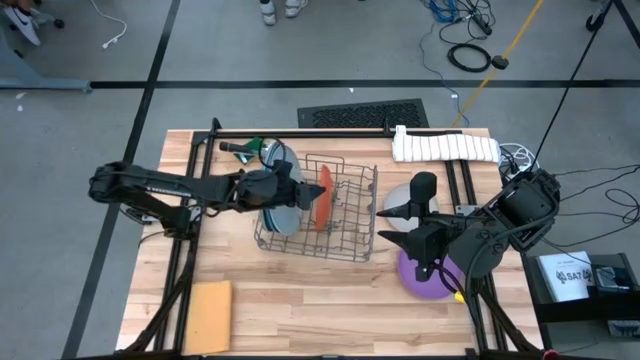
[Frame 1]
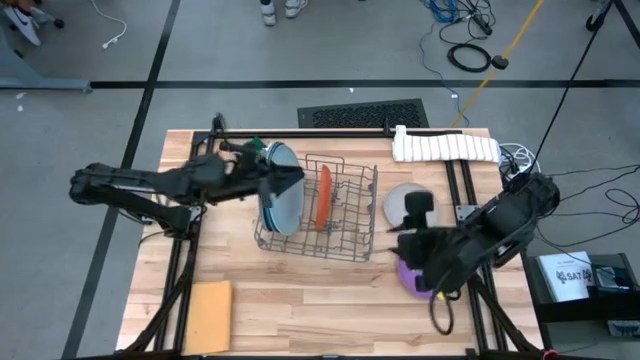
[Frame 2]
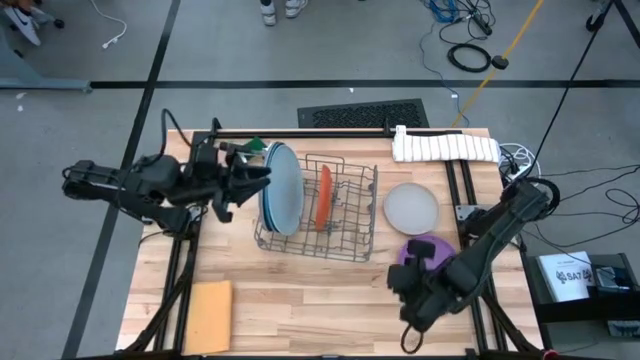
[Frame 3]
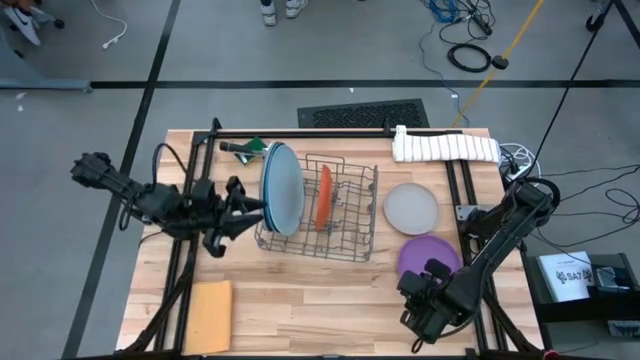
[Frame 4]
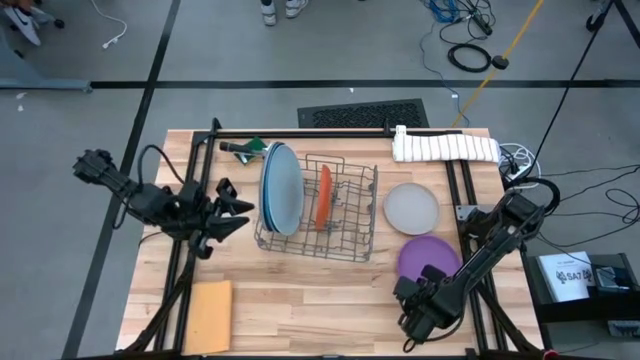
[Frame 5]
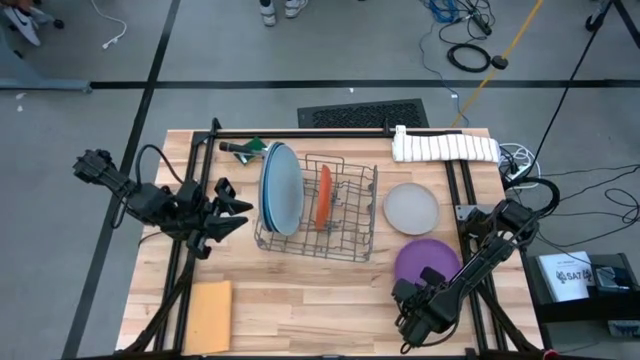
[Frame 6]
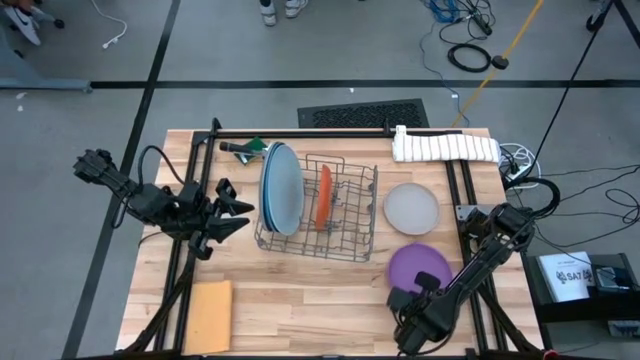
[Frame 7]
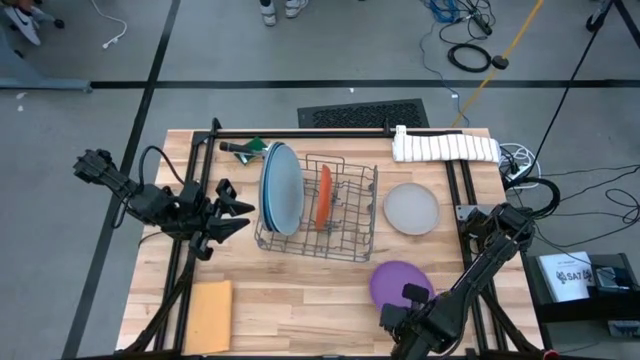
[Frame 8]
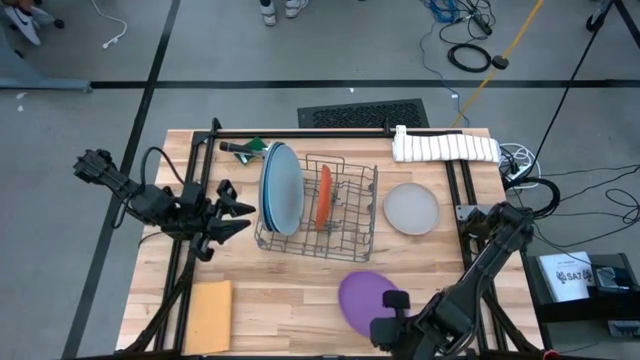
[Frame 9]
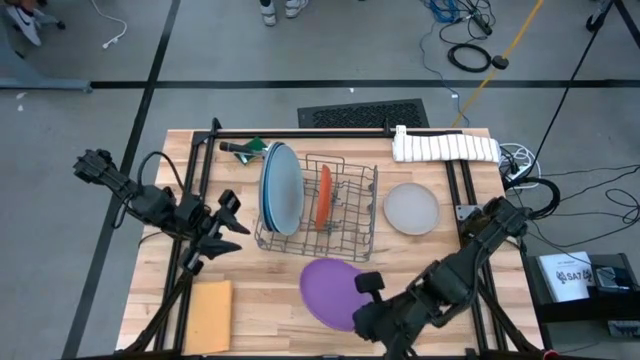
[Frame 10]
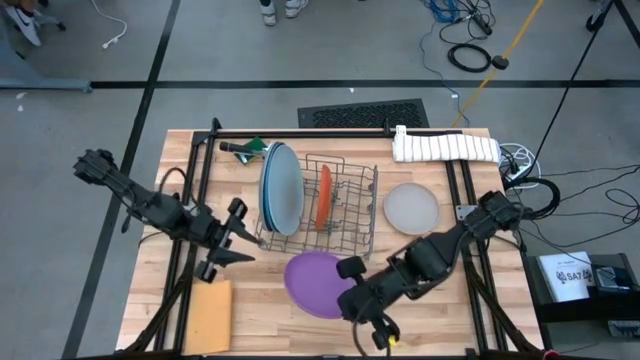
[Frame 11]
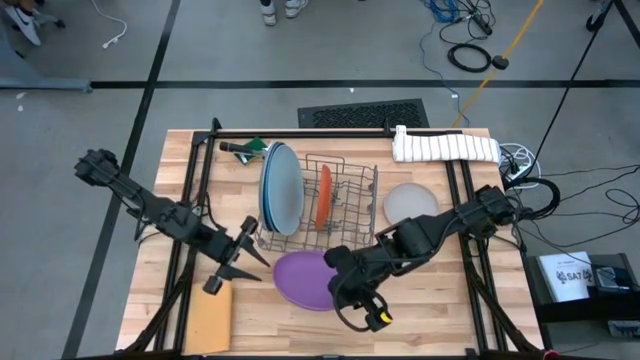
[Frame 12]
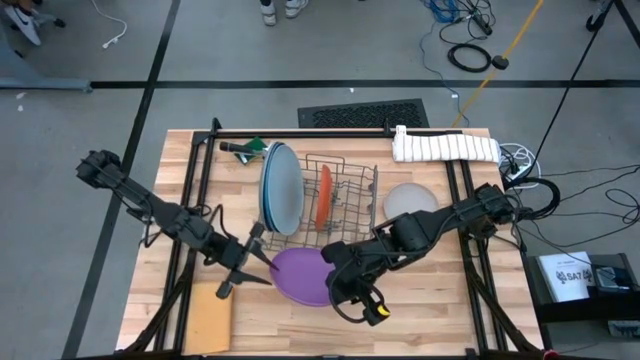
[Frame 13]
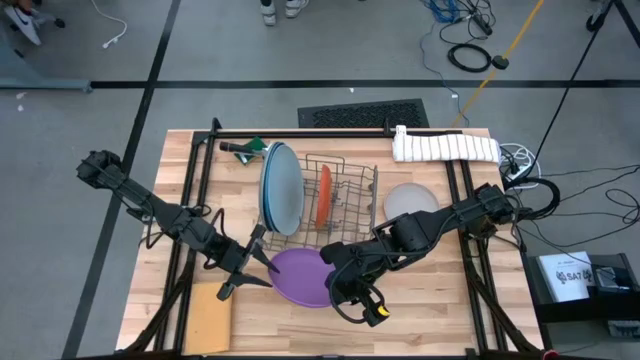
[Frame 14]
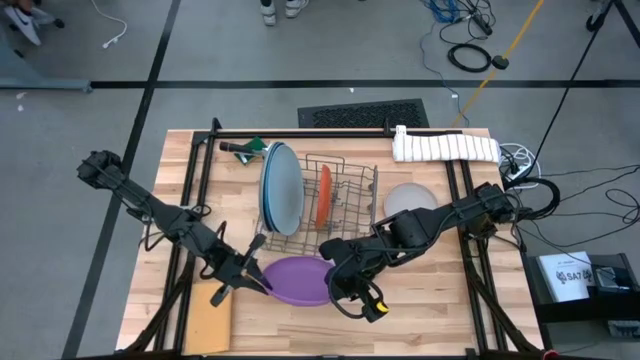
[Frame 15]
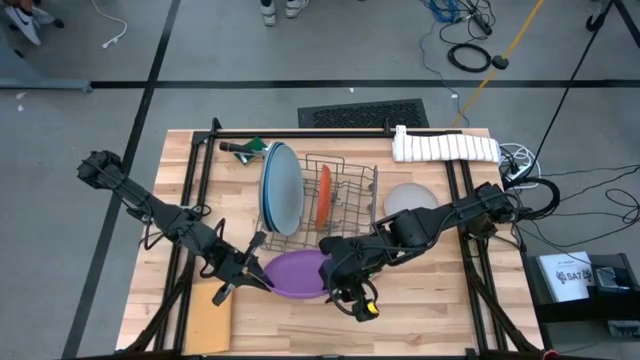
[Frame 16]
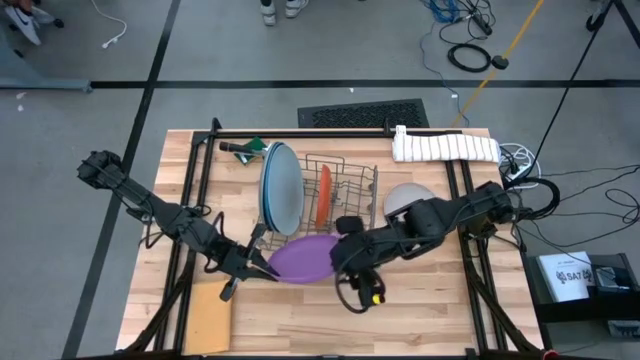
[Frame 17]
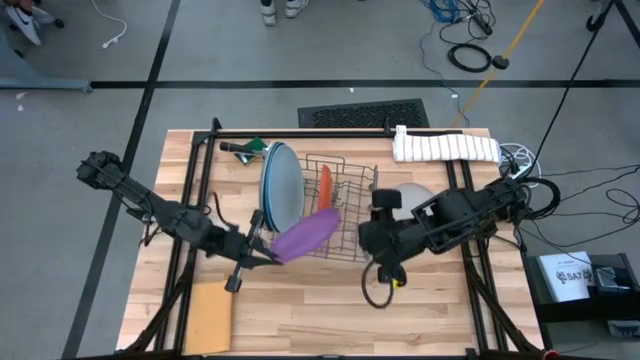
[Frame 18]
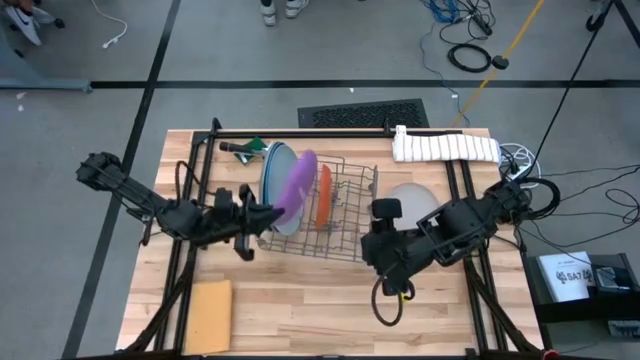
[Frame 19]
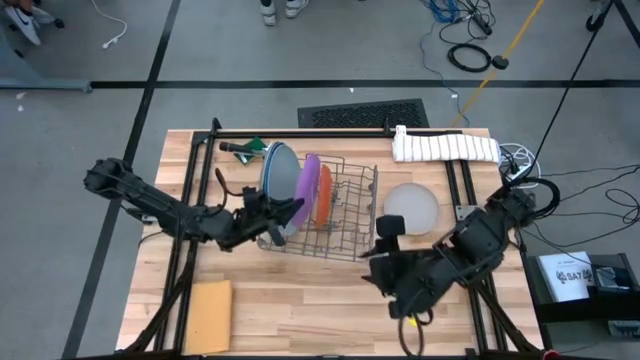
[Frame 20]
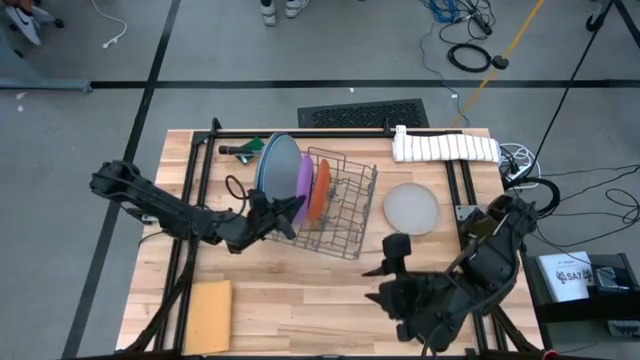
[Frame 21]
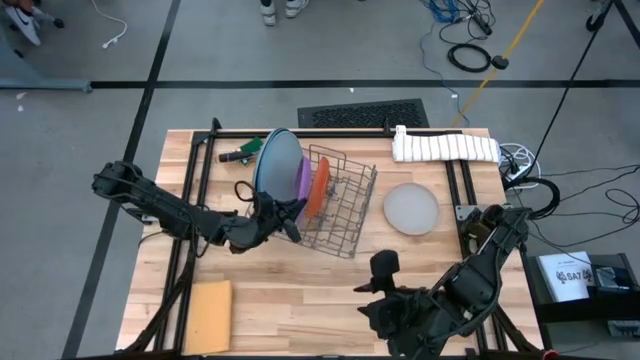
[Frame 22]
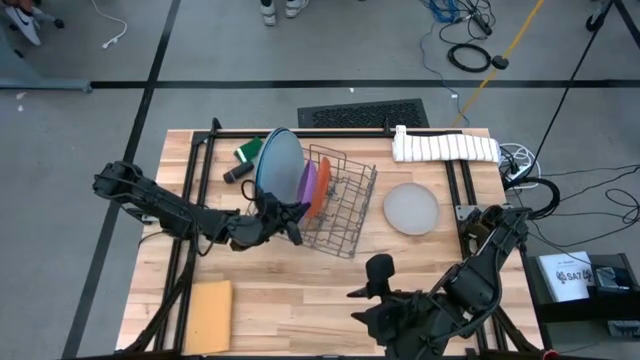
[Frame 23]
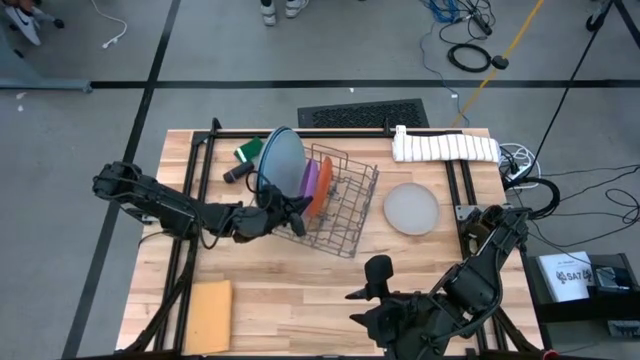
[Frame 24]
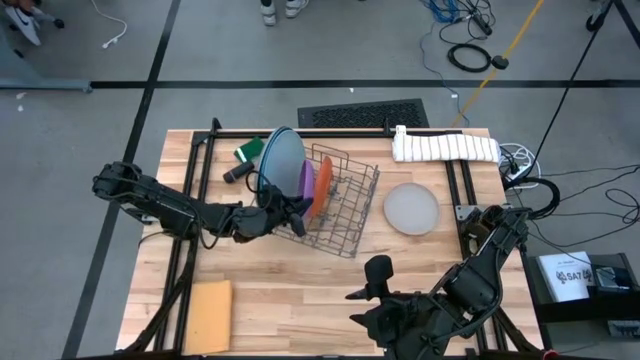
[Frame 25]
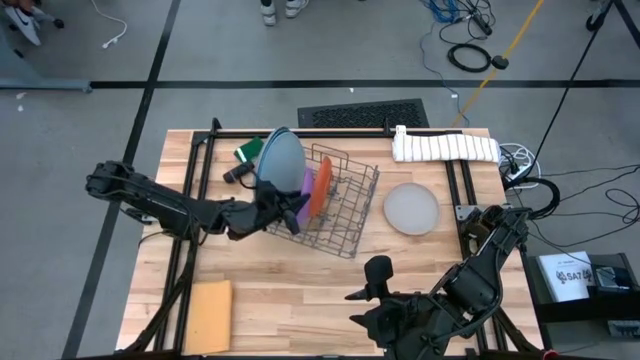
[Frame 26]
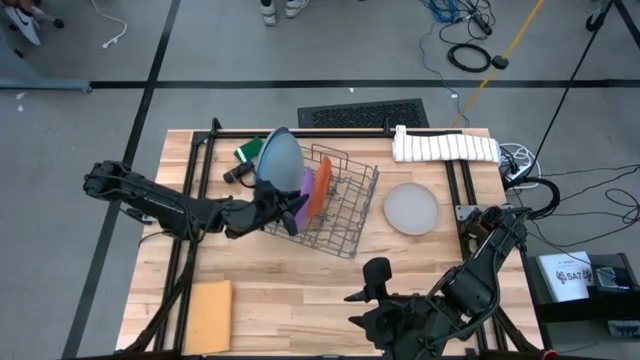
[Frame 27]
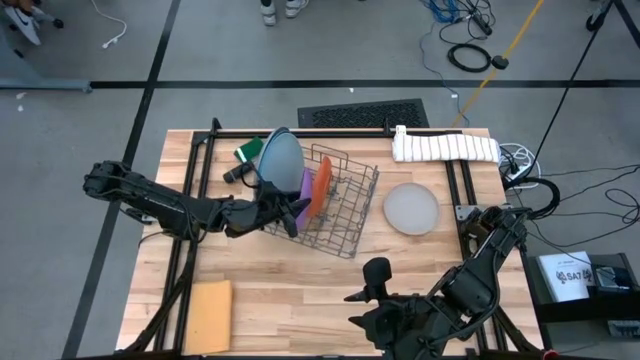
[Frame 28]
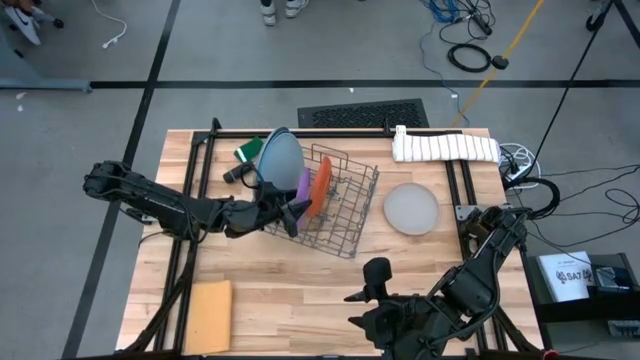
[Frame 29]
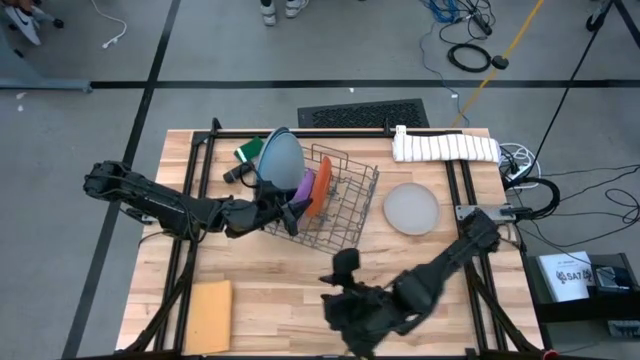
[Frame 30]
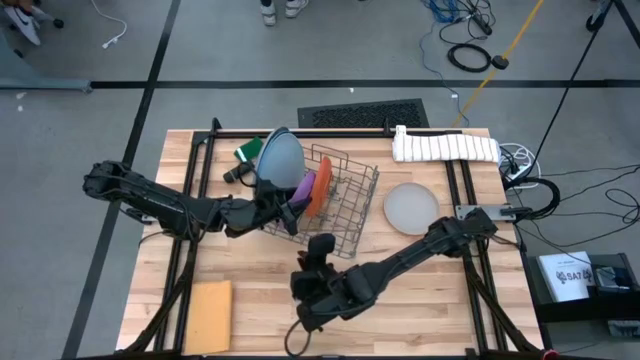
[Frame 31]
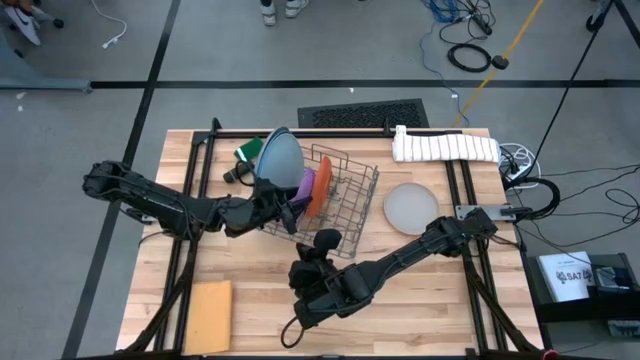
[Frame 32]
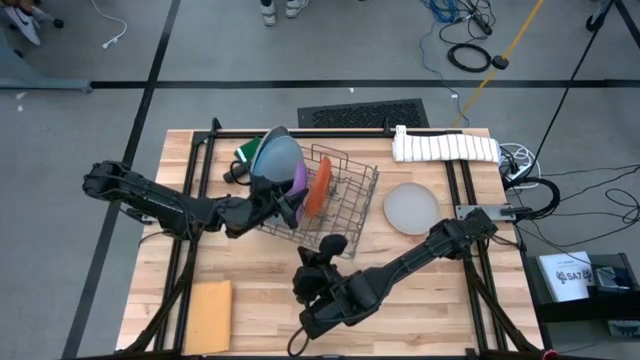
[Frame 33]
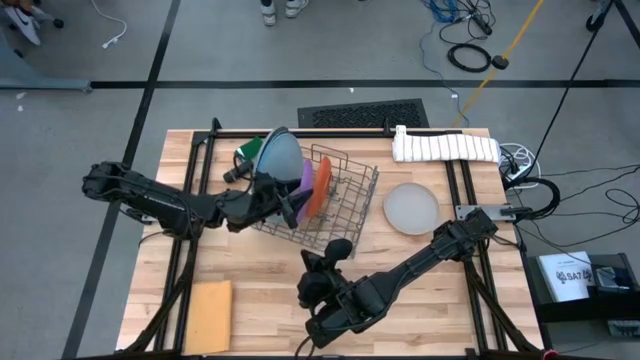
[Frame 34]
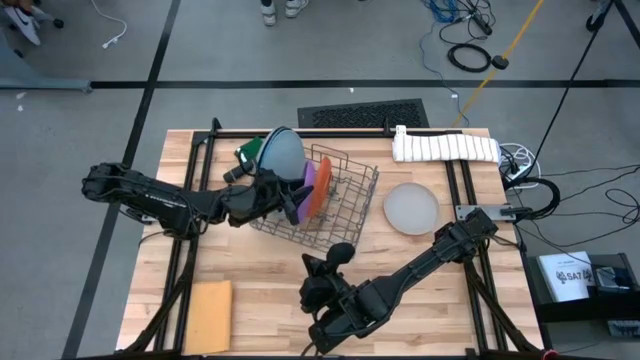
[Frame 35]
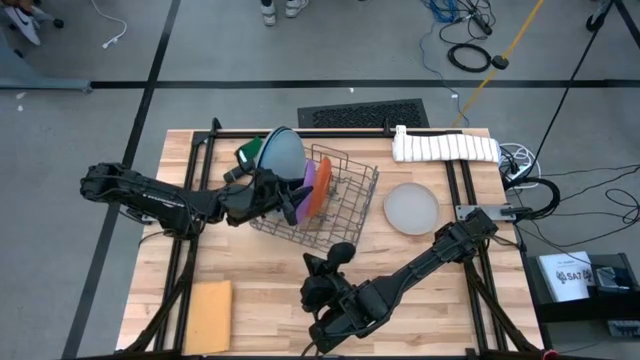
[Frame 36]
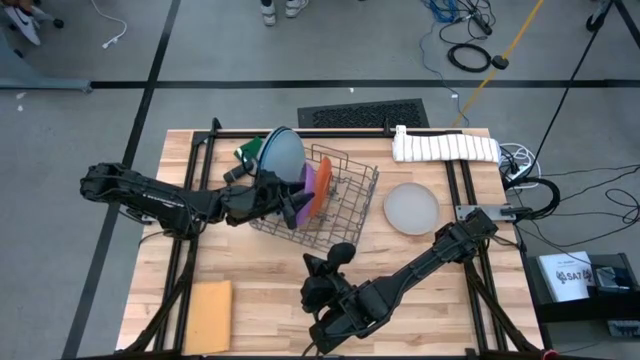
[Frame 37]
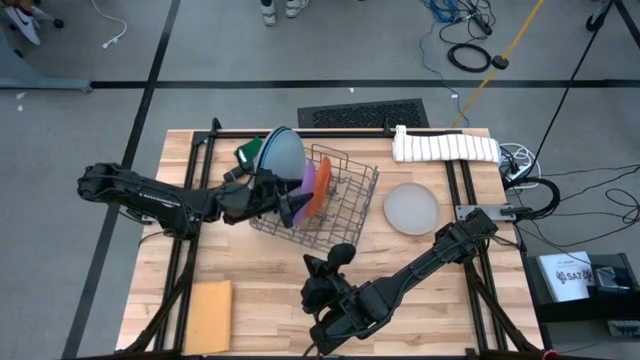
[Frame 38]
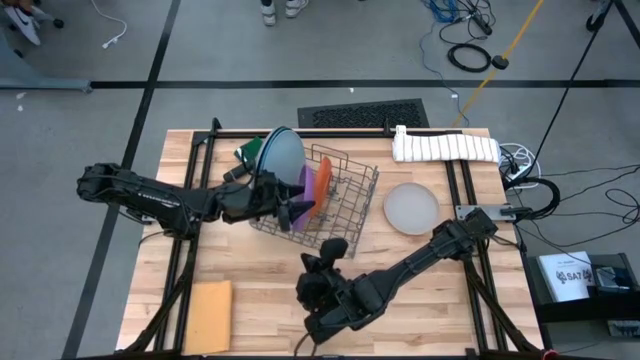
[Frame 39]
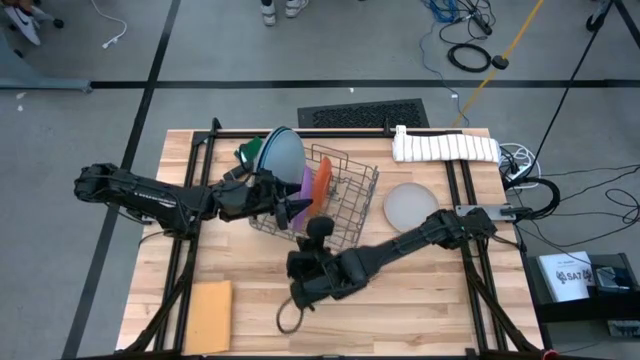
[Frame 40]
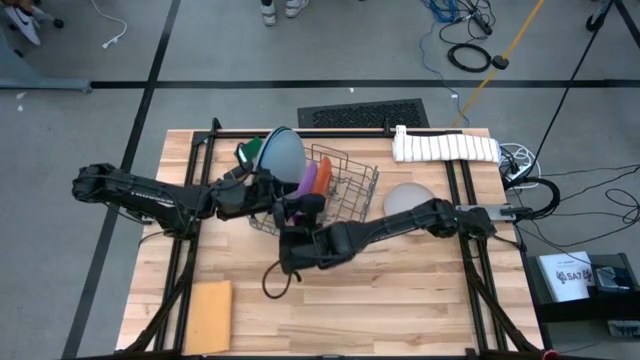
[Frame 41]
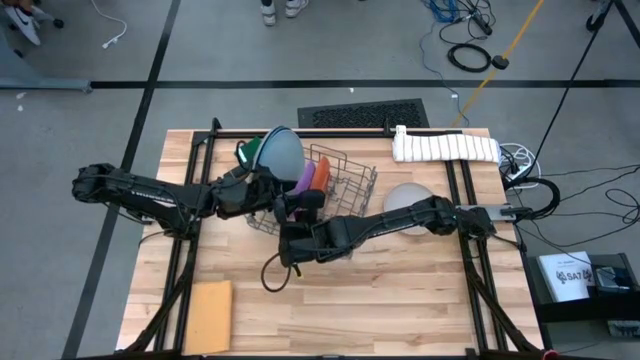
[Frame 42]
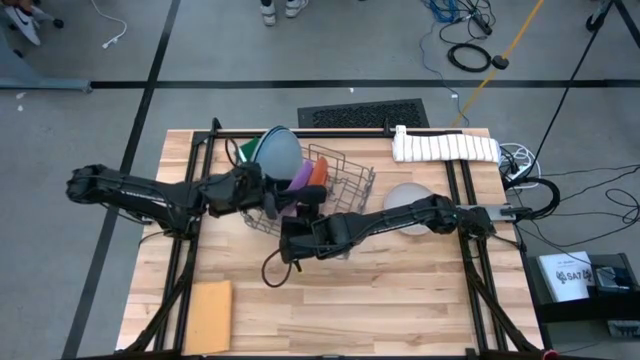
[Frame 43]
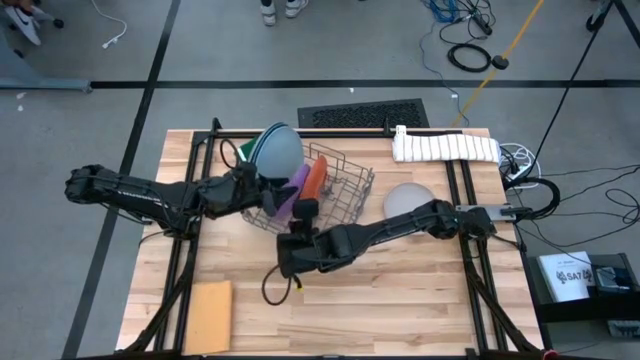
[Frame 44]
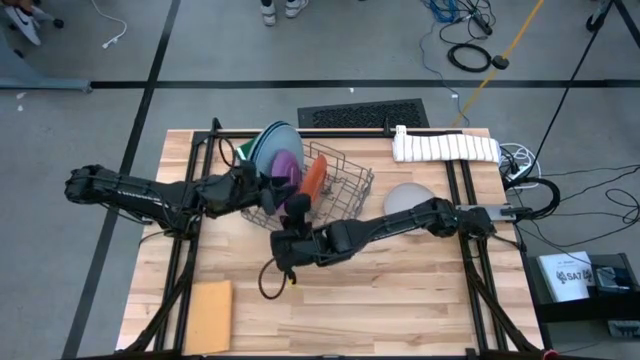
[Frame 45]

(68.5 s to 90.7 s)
Task: Sort dishes
Put the purple plate into the green dish rack
